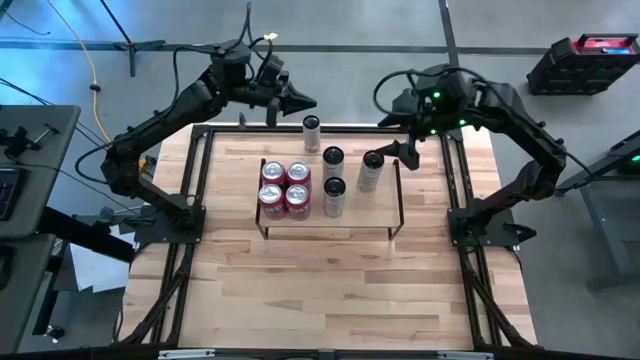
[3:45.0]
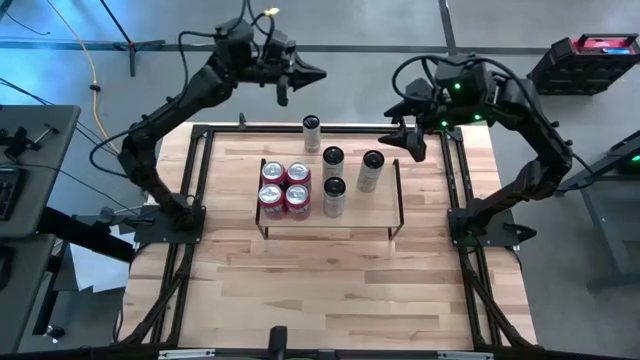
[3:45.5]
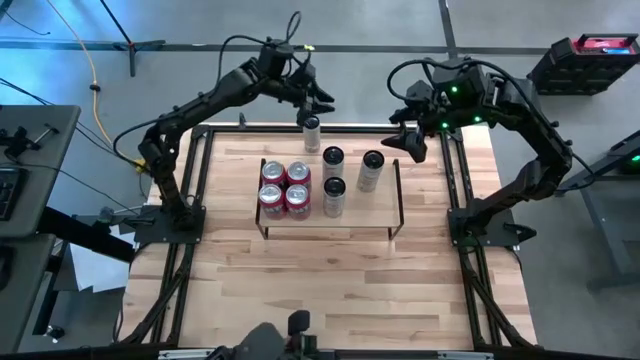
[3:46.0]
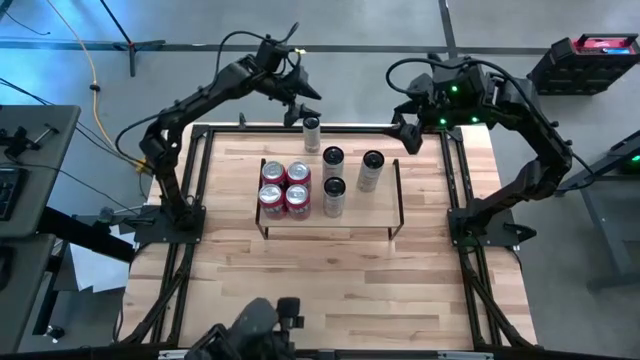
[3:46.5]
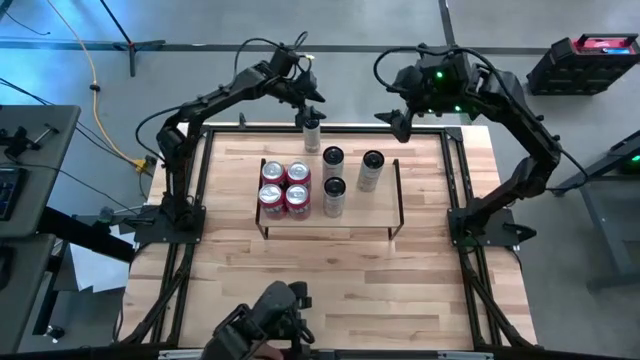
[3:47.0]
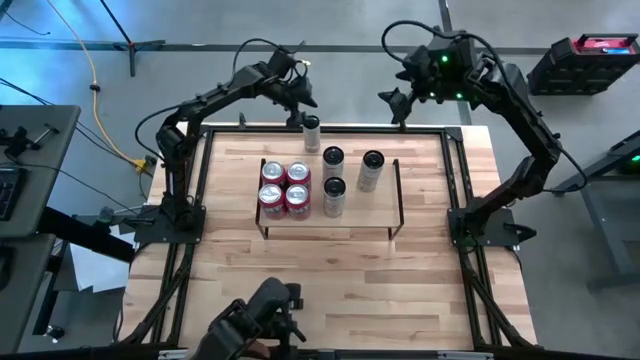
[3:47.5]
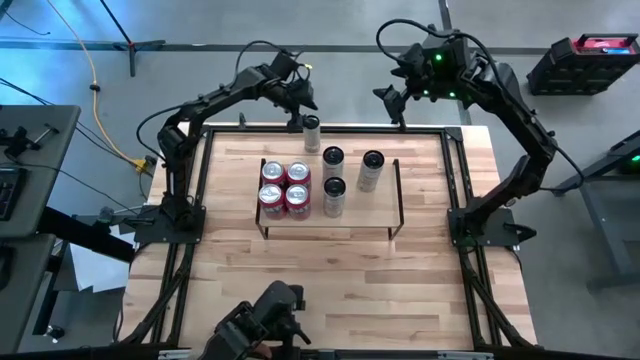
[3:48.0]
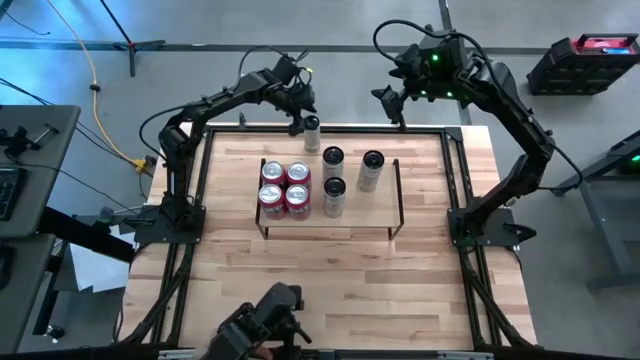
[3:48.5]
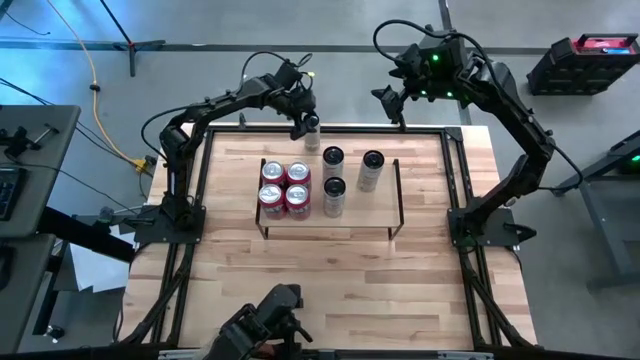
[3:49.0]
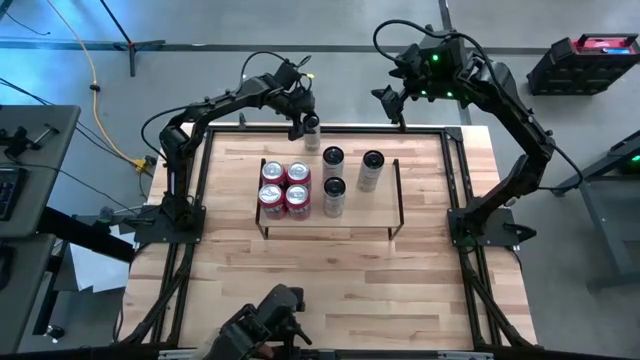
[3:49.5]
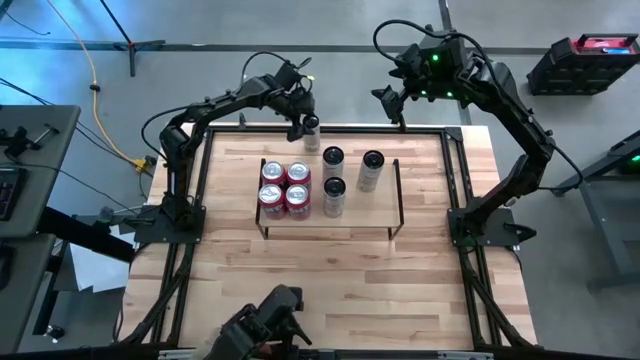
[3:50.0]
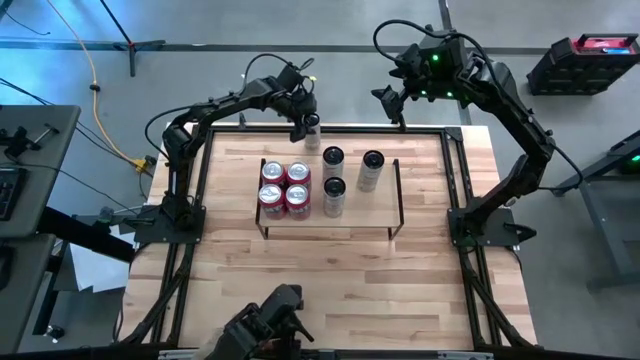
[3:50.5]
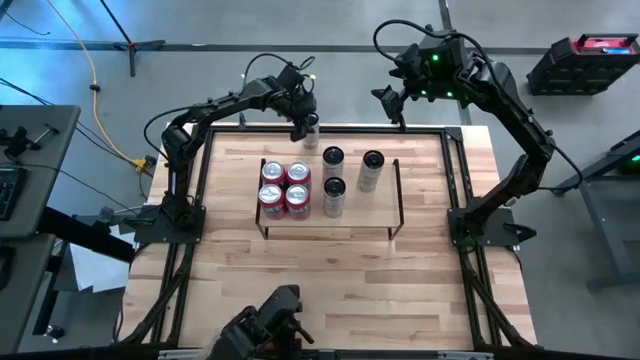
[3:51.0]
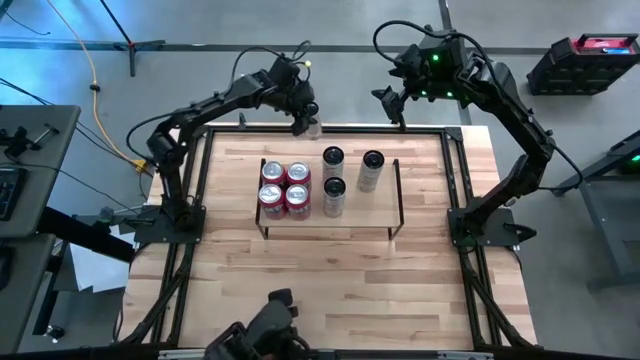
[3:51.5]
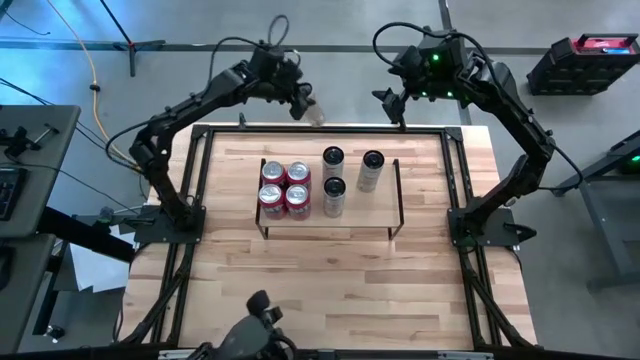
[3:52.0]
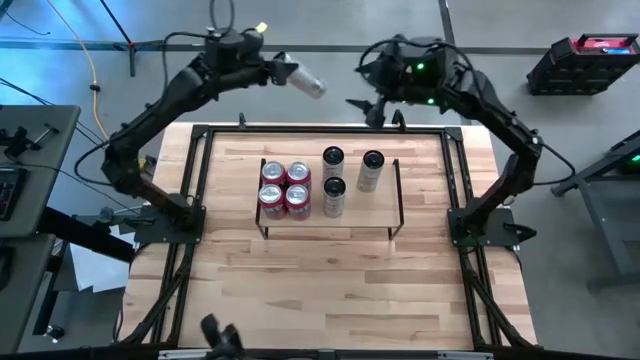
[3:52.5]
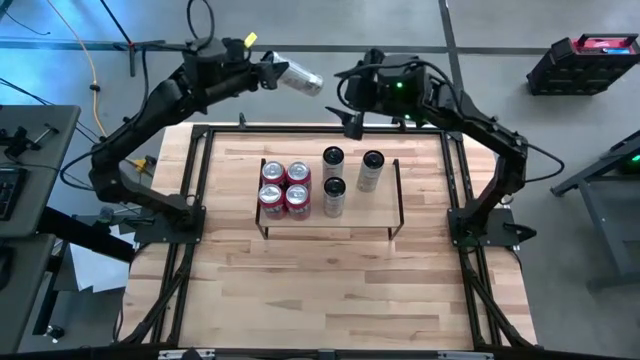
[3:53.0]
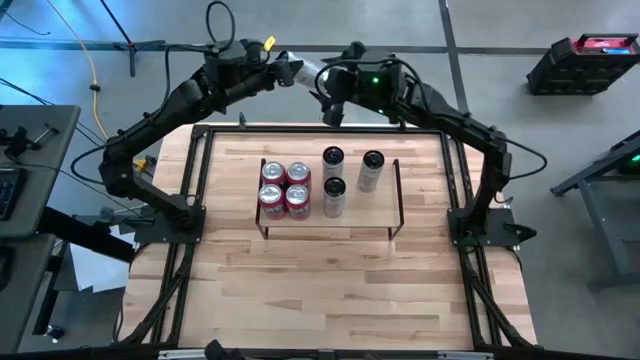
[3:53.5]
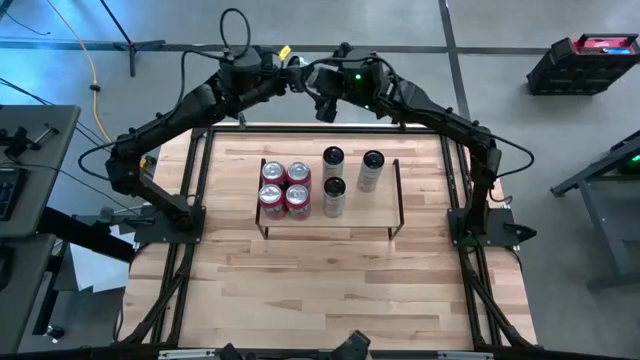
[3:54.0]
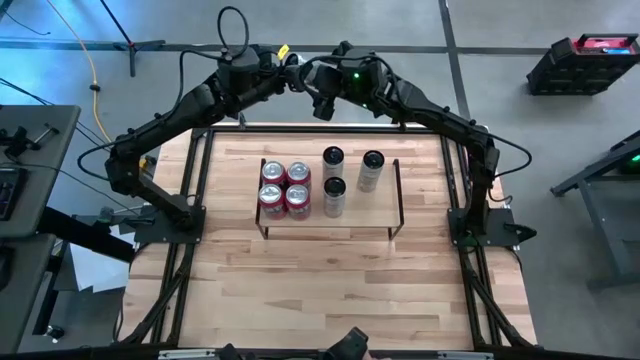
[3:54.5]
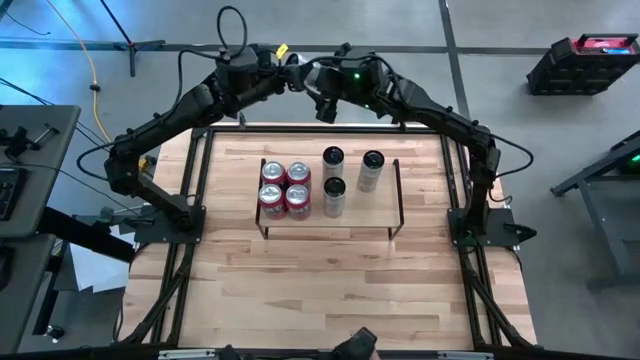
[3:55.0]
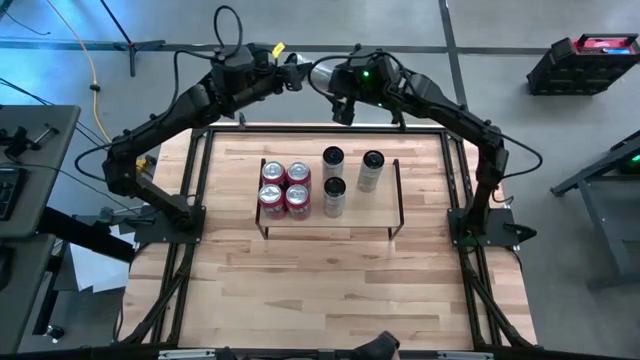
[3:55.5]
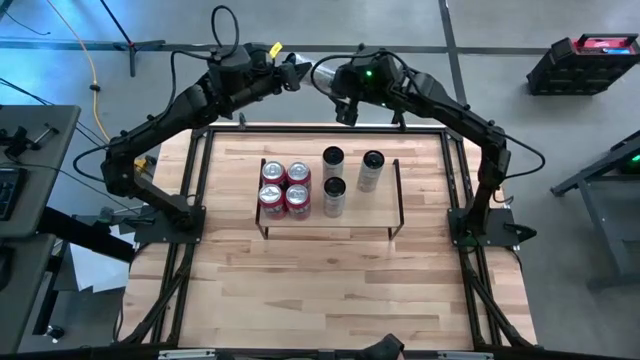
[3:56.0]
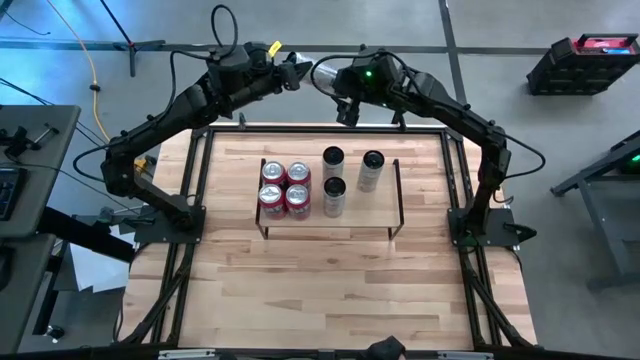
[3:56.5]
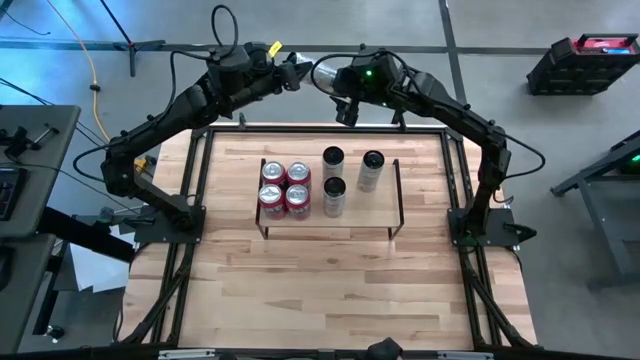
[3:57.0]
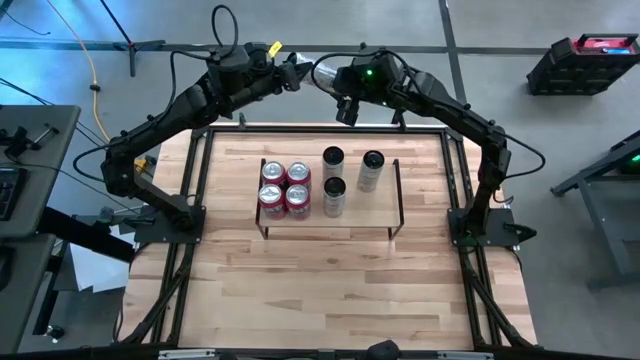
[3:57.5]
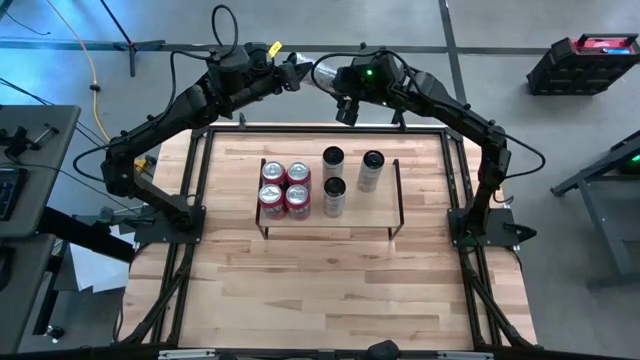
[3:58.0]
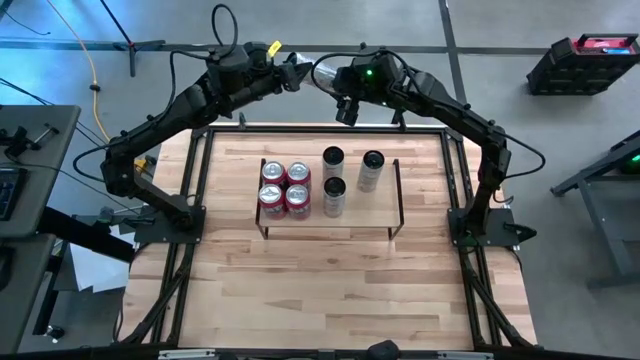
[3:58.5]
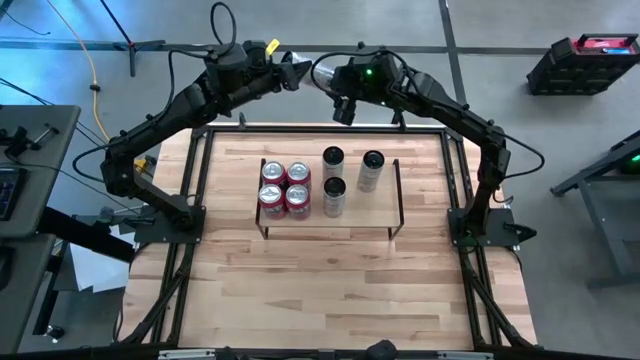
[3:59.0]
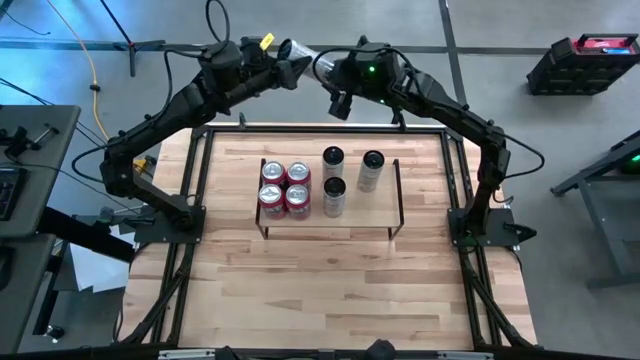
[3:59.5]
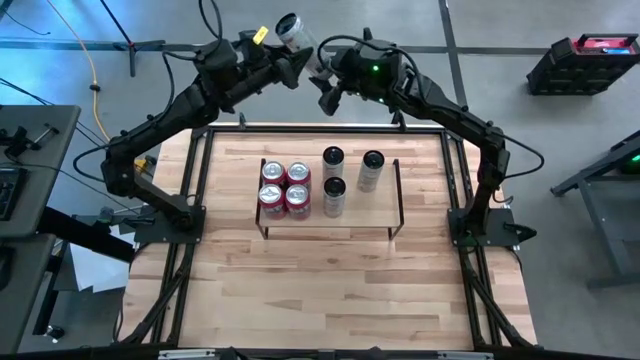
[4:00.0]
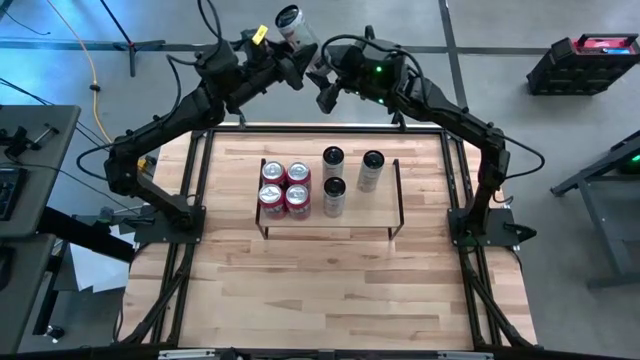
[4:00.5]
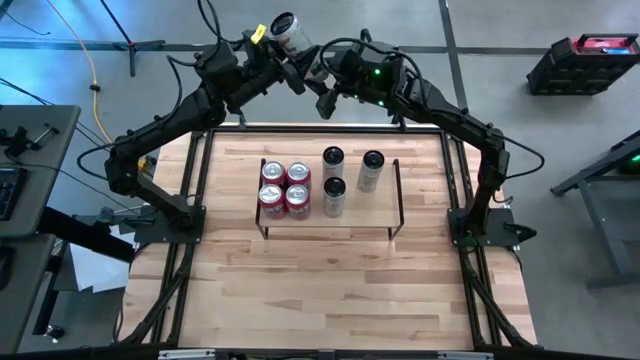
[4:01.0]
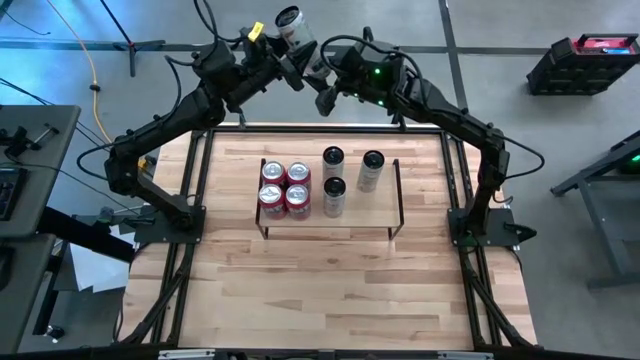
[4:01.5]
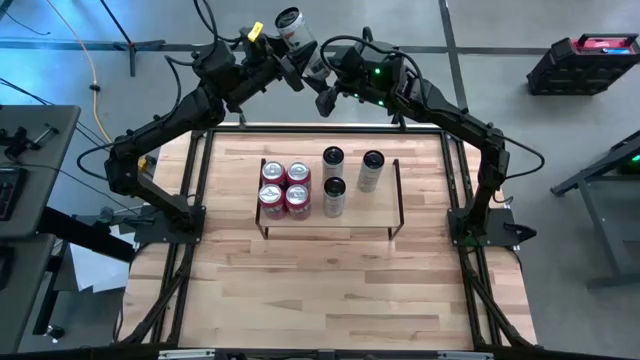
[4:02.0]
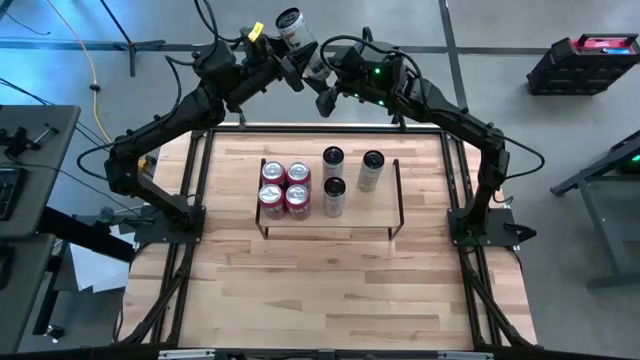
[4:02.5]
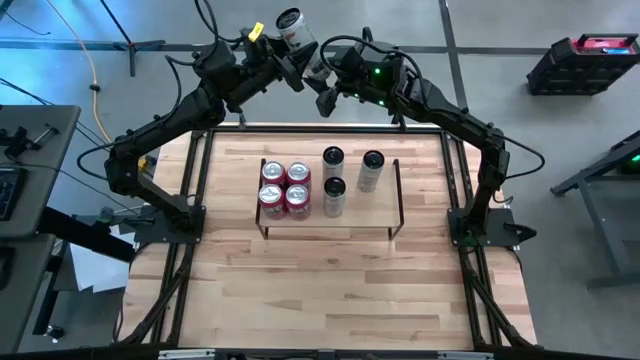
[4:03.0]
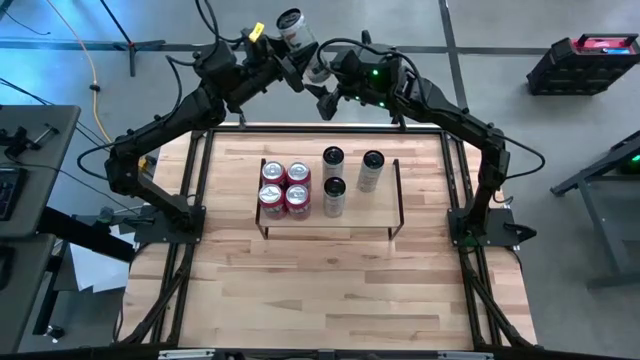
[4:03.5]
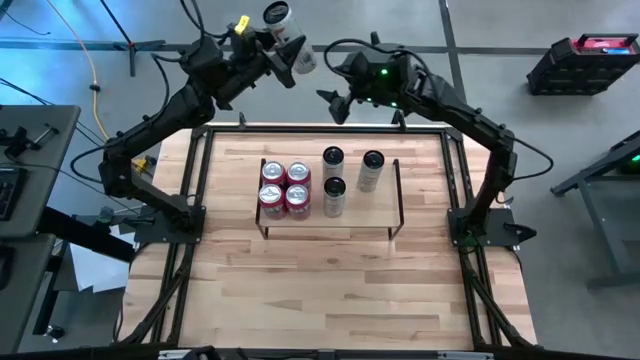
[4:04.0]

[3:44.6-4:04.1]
Task: Place canned beverage on shelf
Put the white yellow soda can on the shelf aligned with the other white yellow soda can

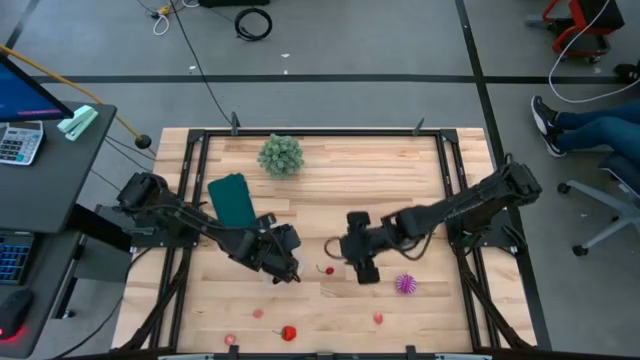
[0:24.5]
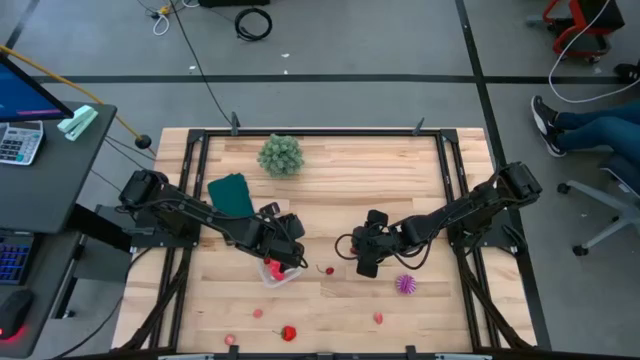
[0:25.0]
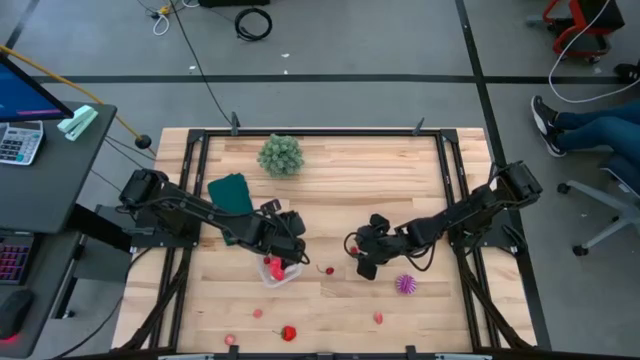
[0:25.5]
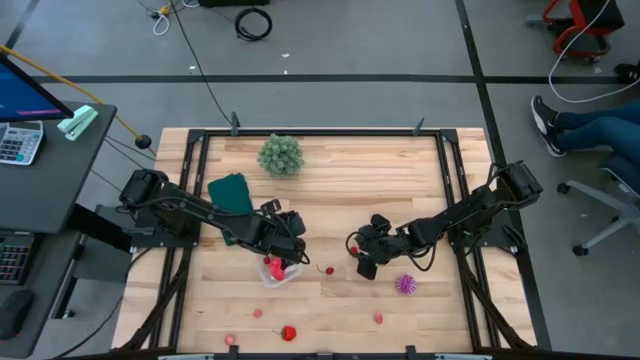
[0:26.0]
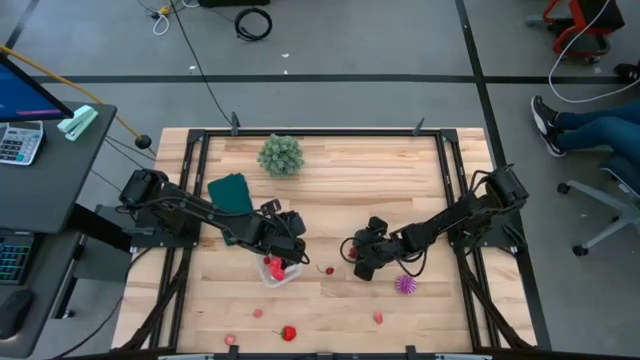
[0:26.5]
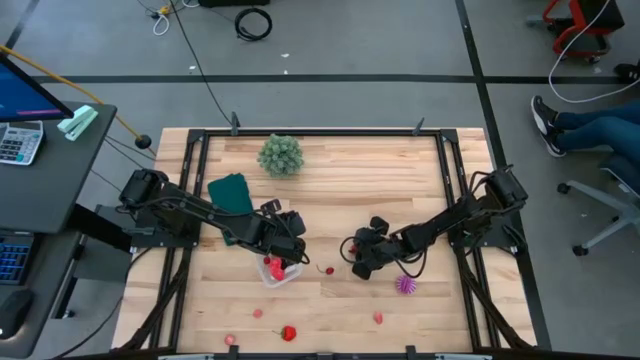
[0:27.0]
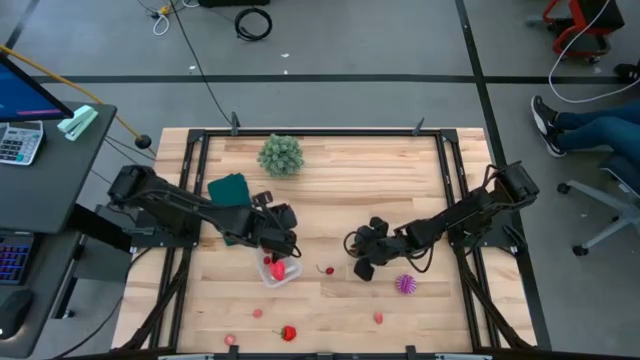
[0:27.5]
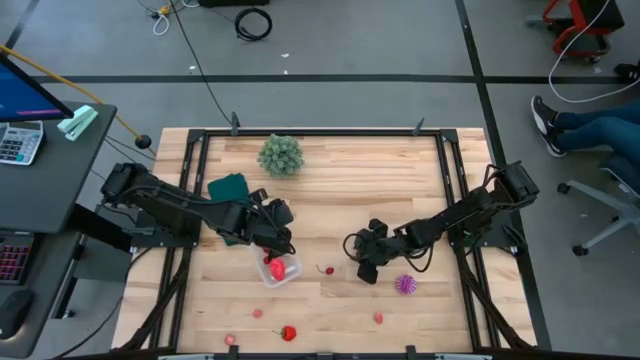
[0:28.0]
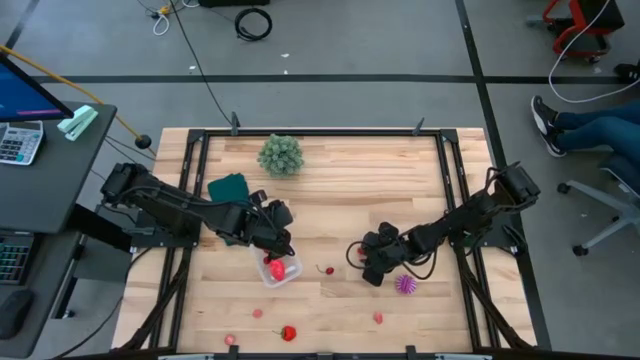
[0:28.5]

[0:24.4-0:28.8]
Task: Pick and placing Produce into tupperware
Put the red raspberry into the transparent bin
